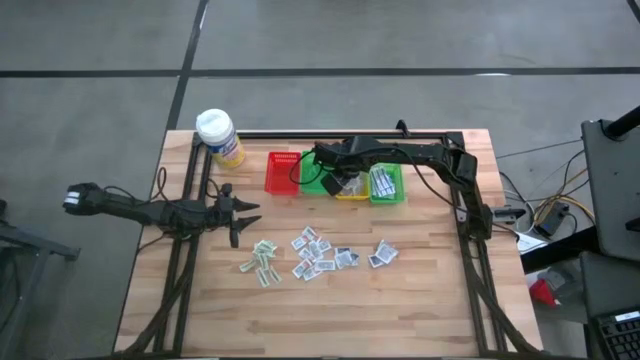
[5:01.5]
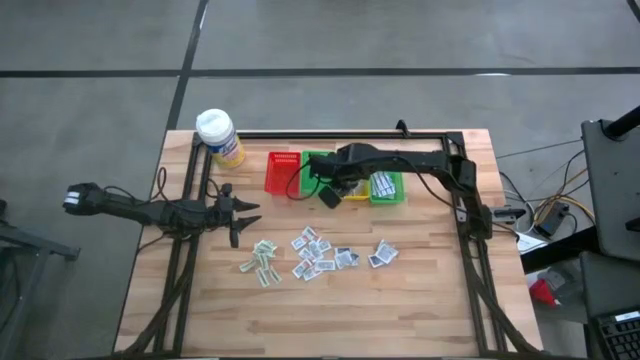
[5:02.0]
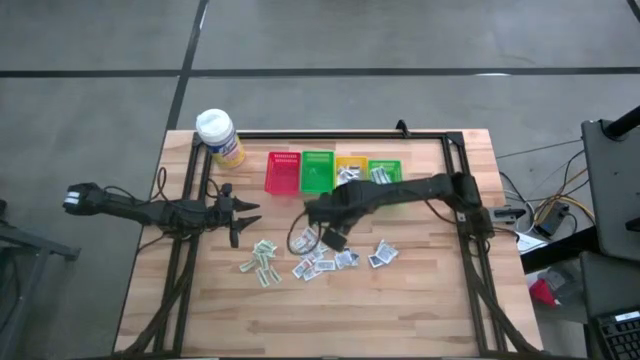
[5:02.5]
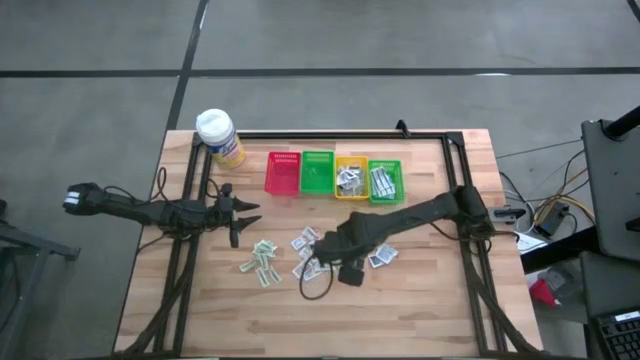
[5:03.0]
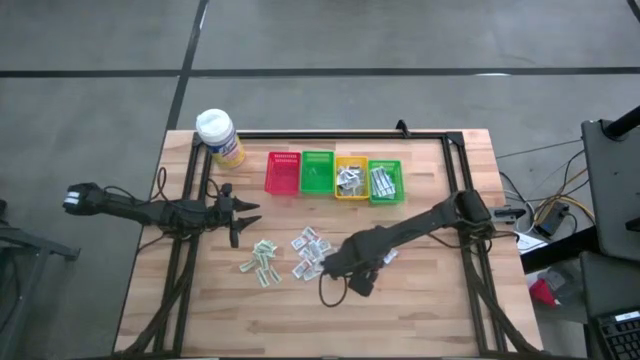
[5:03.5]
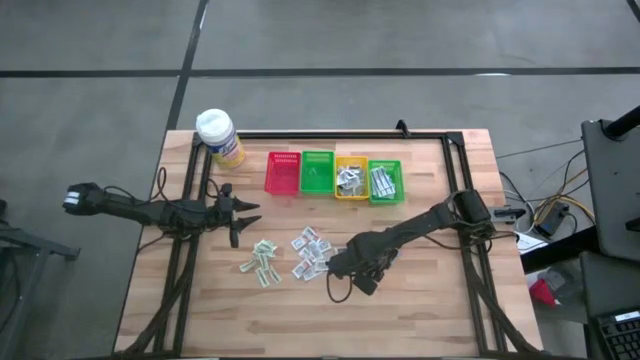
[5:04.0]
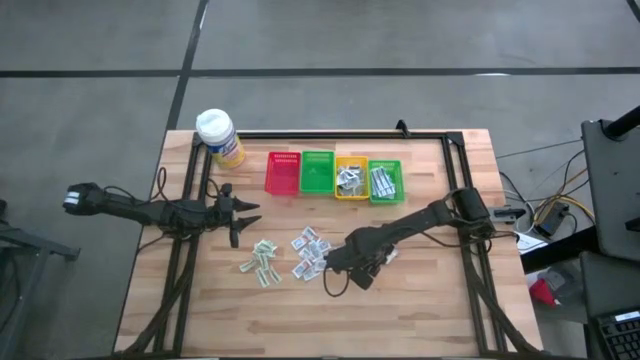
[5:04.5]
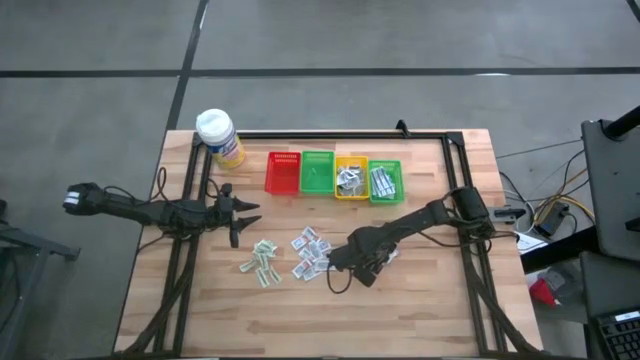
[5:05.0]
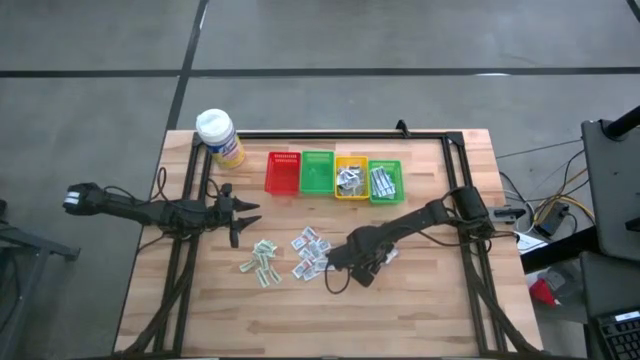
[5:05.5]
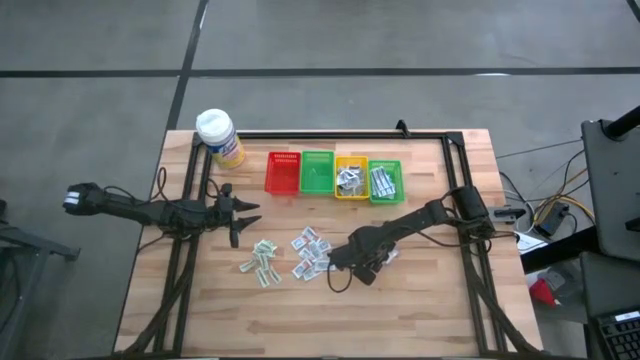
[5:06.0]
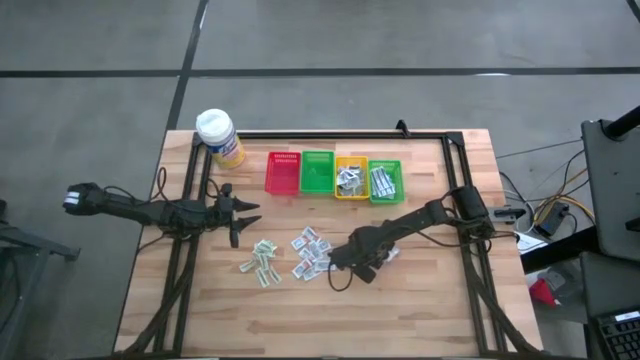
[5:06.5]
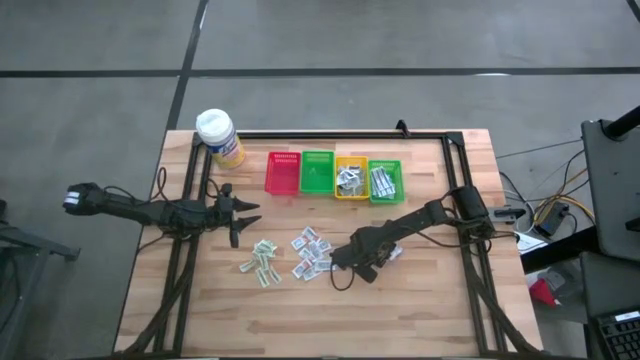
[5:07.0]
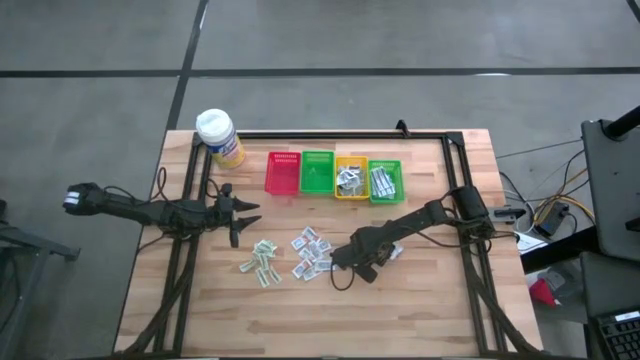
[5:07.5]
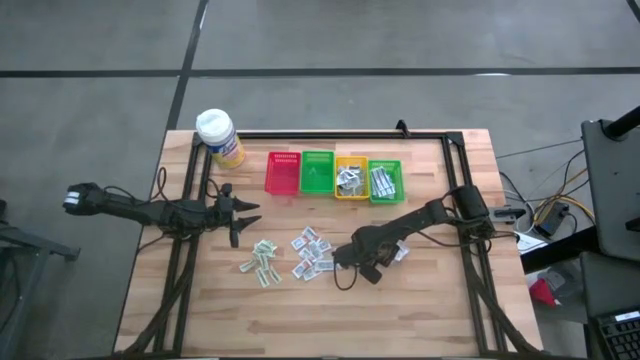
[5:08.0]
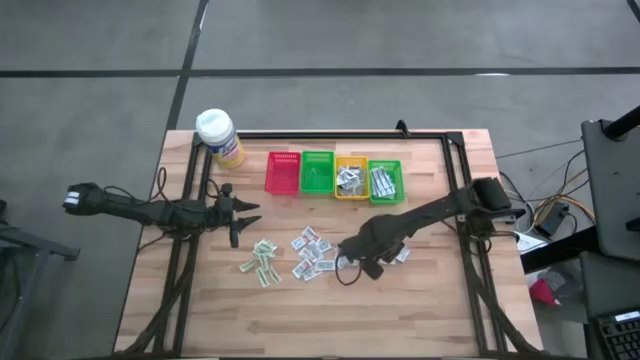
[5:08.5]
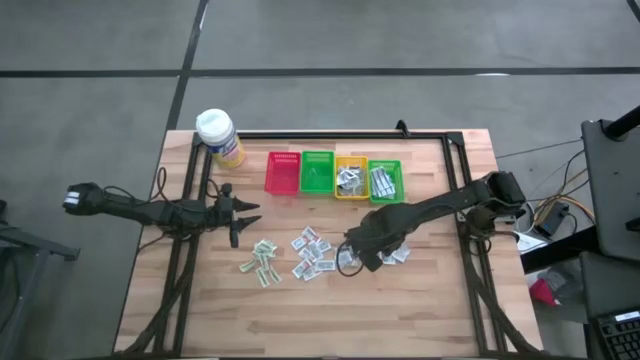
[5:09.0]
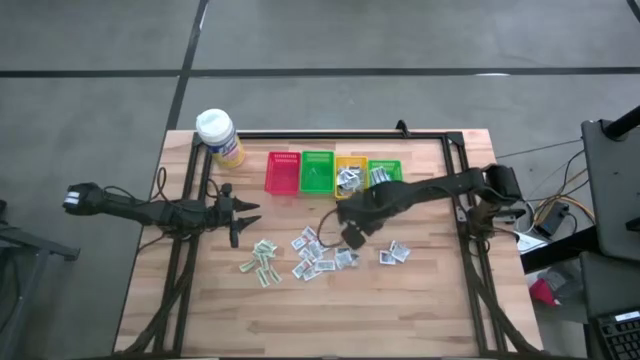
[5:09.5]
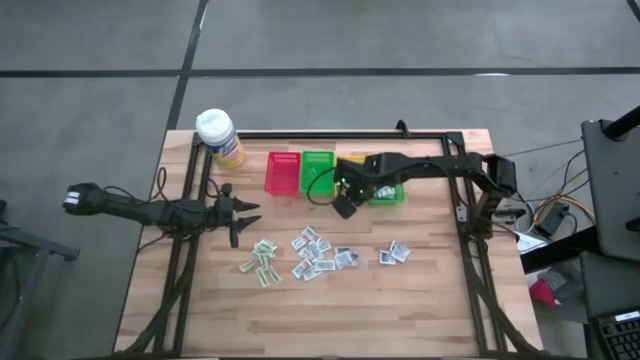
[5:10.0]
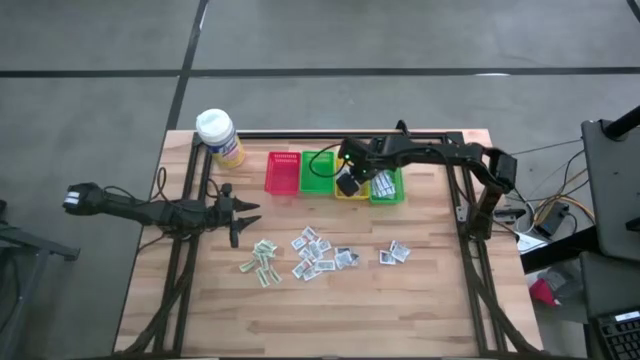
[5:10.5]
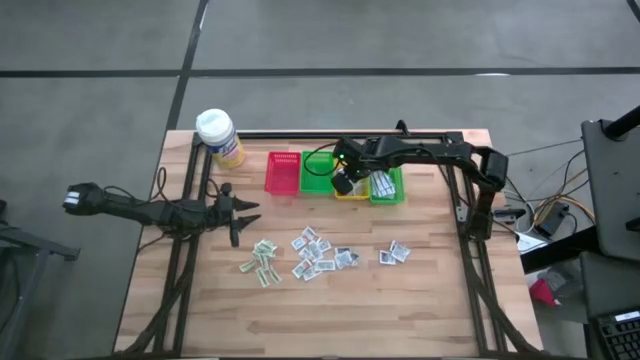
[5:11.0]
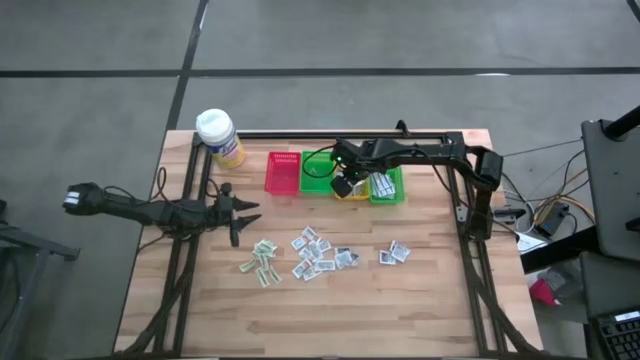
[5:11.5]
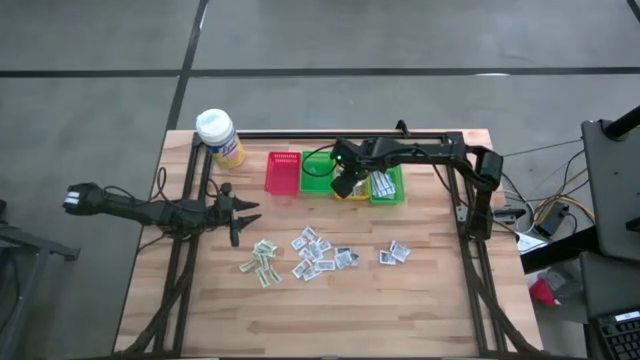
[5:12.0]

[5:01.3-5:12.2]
Task: Pick & Place First Aid Supplies
Put the blue alcohol pad into the yellow bin

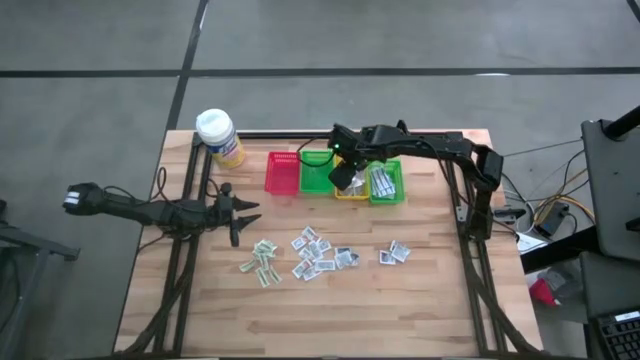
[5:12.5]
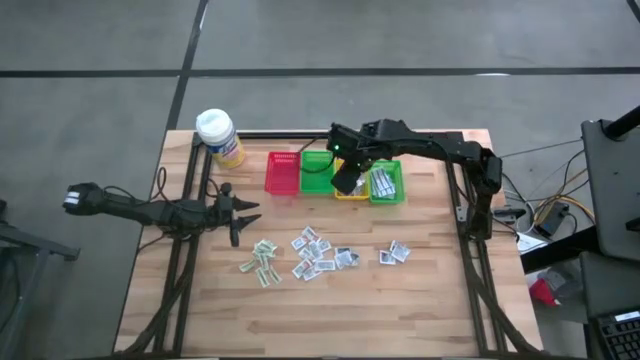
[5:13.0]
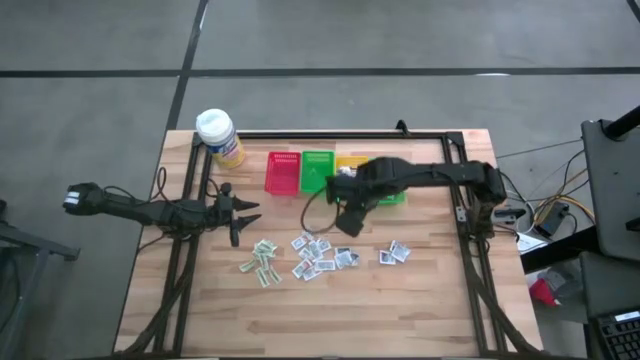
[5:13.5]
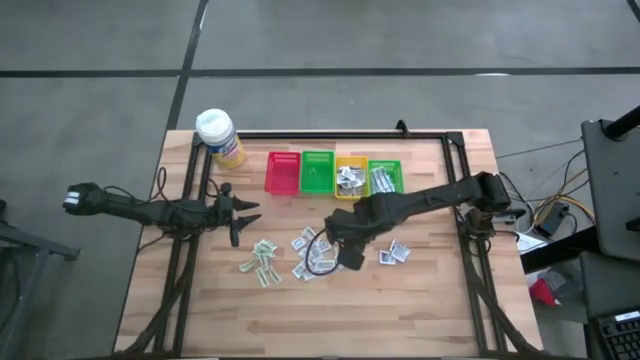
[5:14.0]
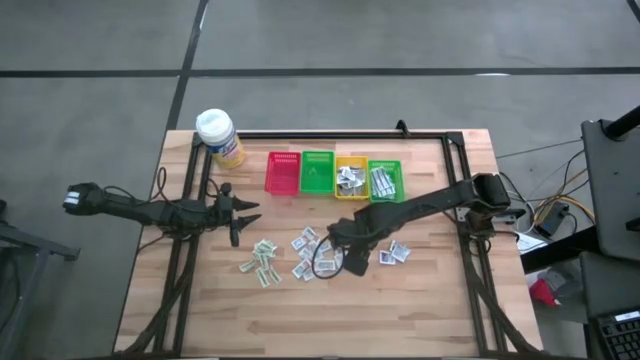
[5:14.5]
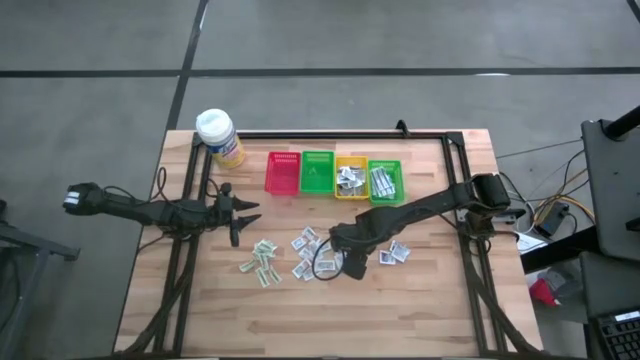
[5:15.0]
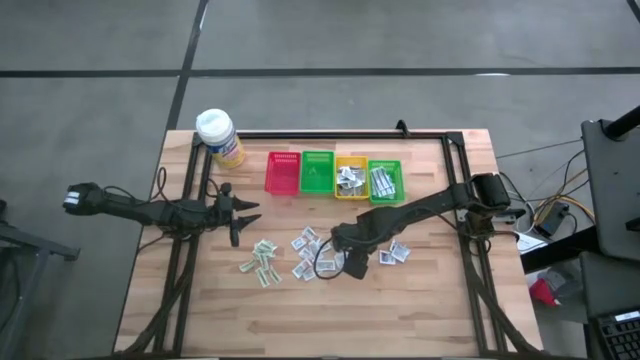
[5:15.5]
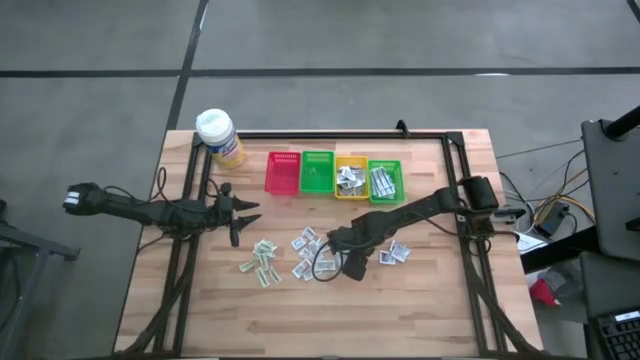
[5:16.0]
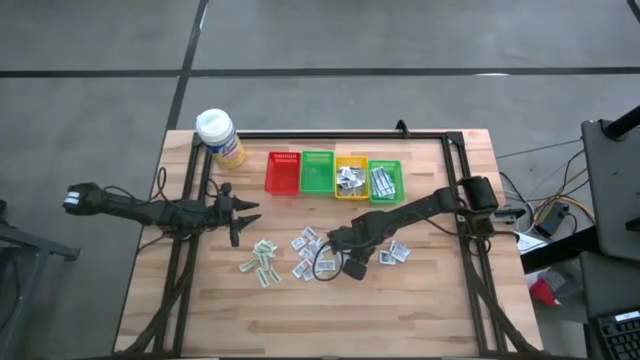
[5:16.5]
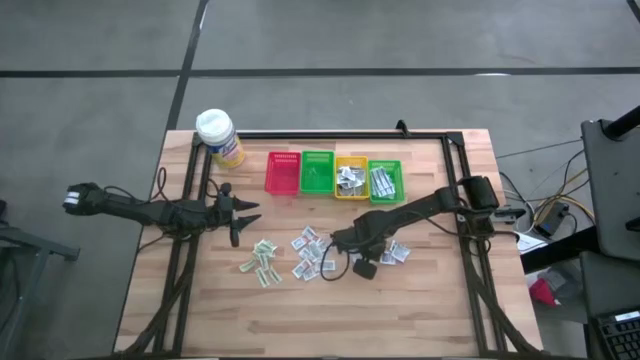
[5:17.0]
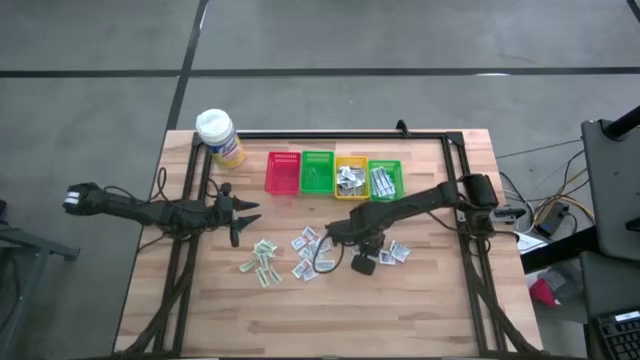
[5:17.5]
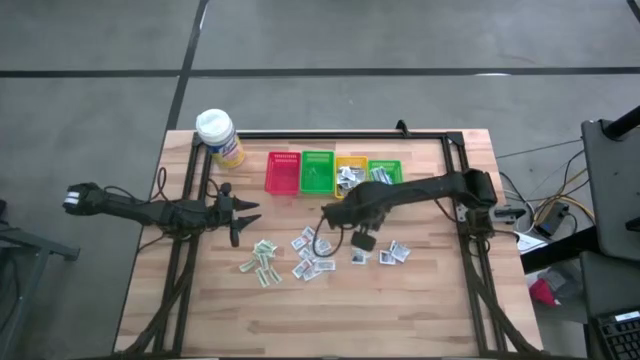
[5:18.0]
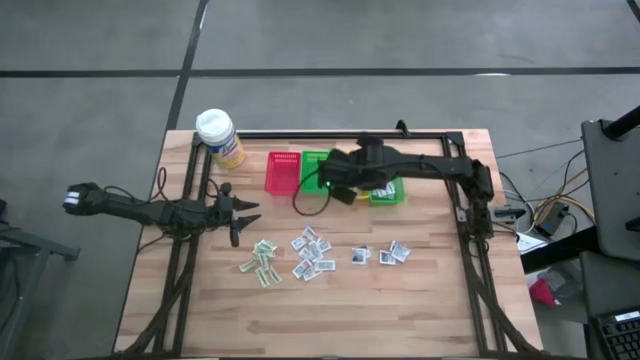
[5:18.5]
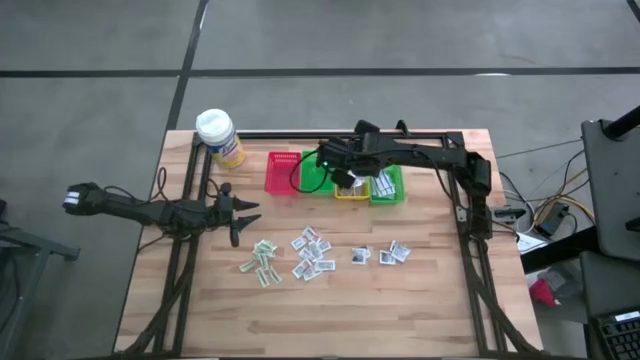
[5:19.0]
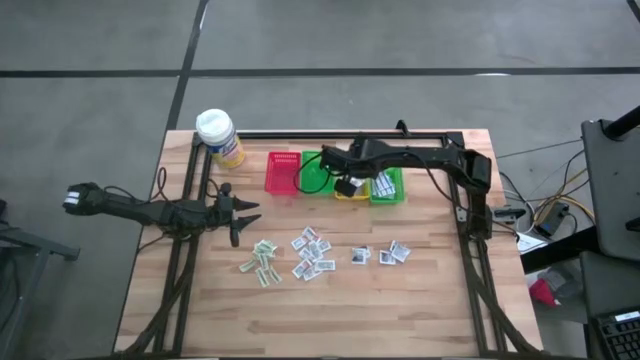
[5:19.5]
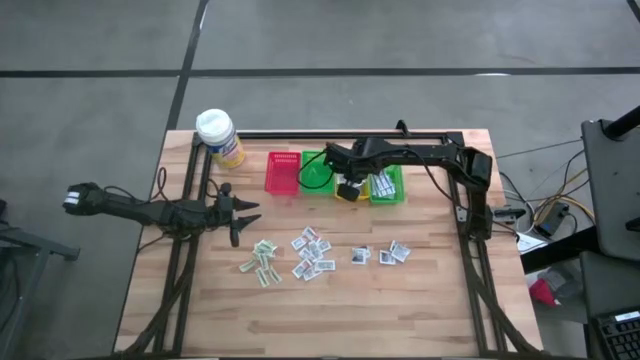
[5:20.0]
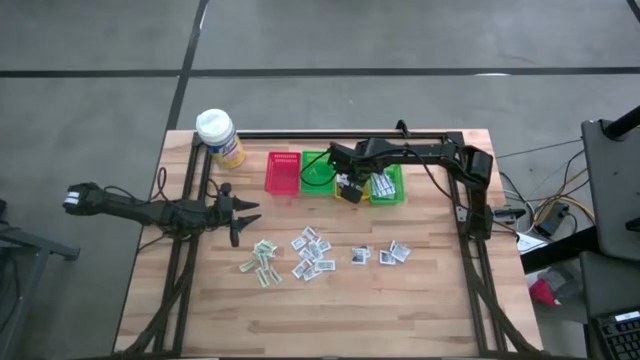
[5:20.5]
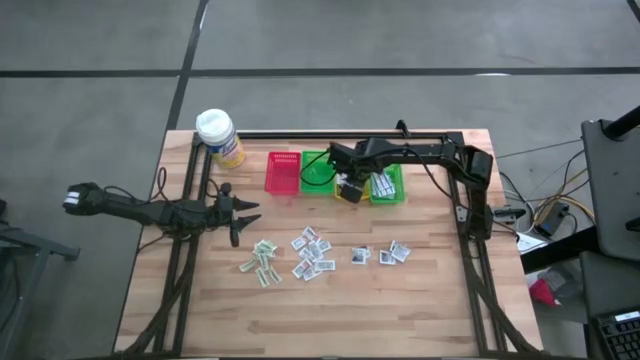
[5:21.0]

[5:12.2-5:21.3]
Put the blue alcohol pad into the yellow bin

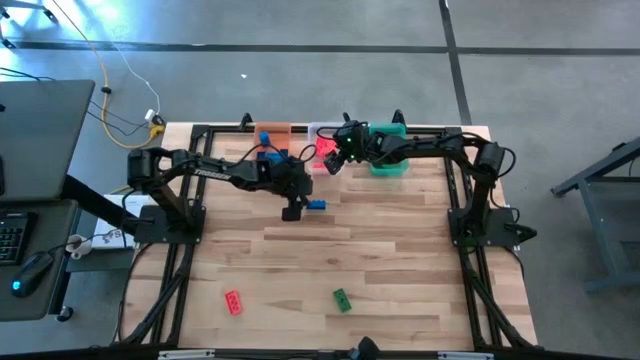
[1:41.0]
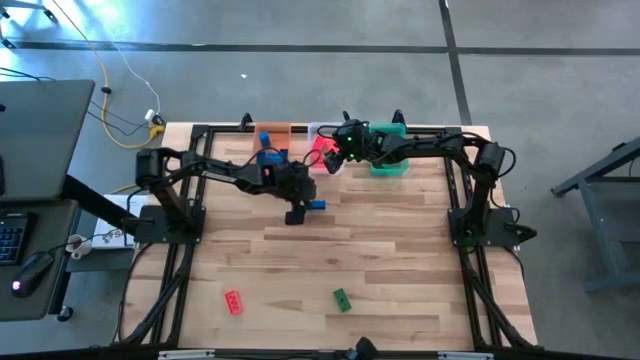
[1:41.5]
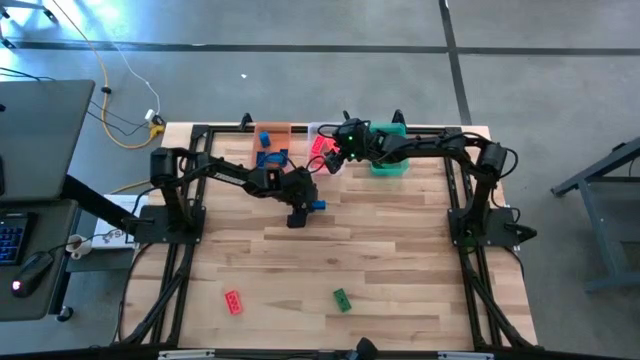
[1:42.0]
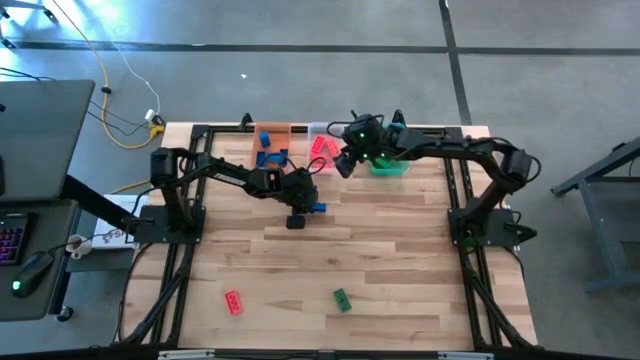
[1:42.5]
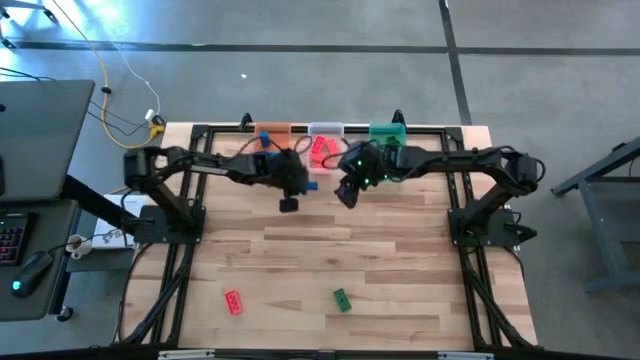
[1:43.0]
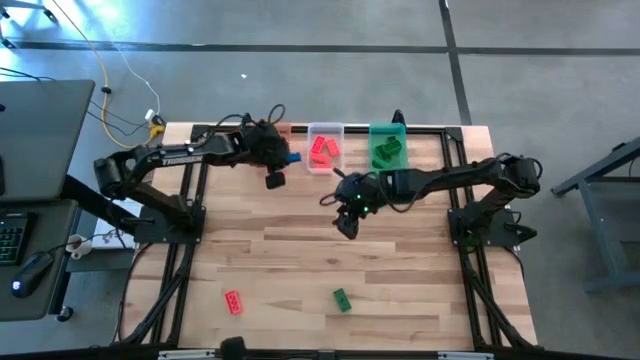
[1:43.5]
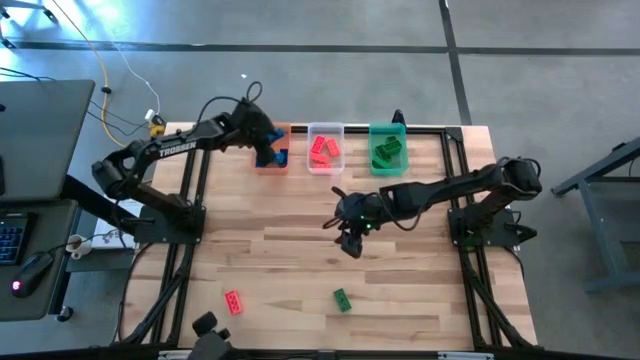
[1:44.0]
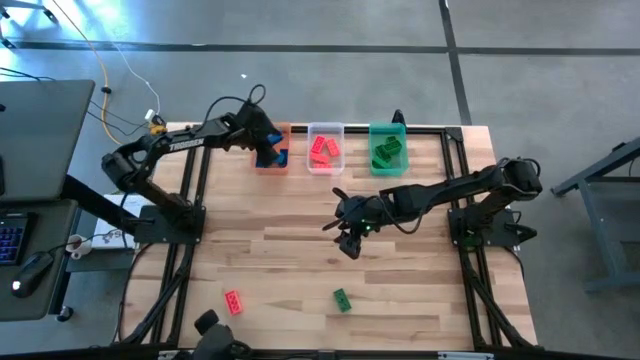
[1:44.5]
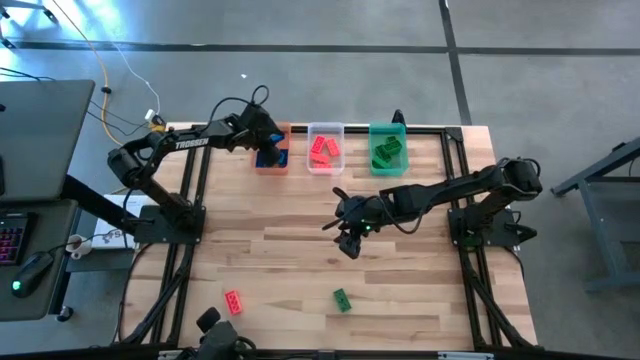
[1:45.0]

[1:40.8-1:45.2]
Task: Sort & place blocks by color
Put the blue game piece into the orange bin
